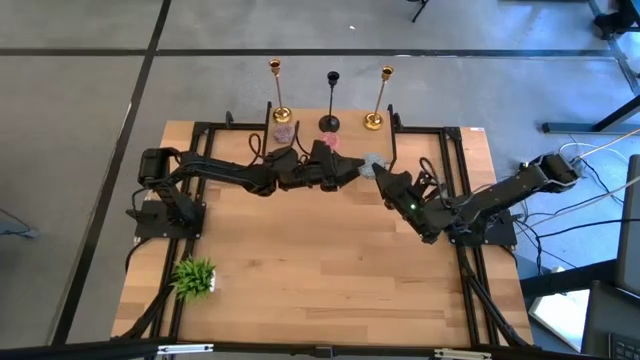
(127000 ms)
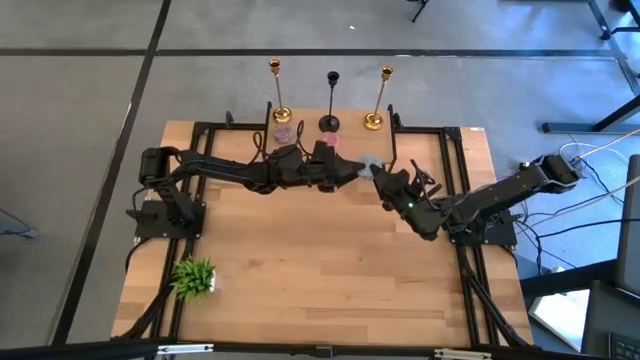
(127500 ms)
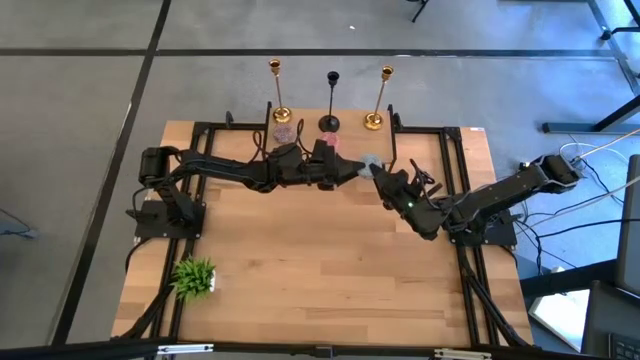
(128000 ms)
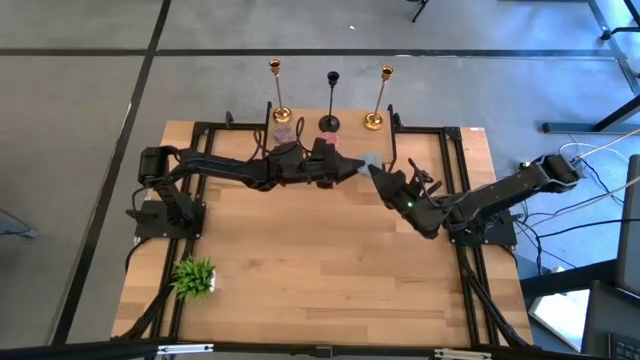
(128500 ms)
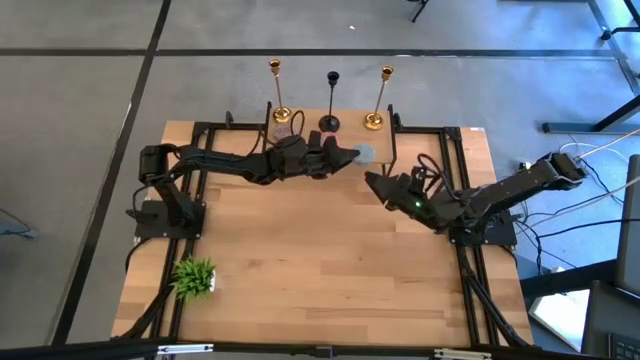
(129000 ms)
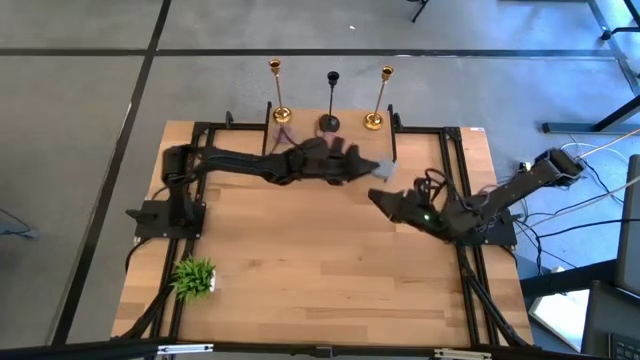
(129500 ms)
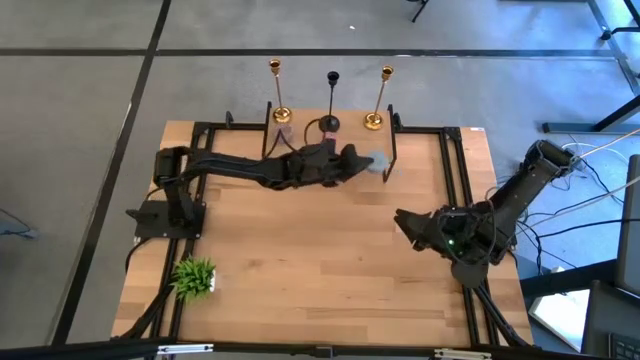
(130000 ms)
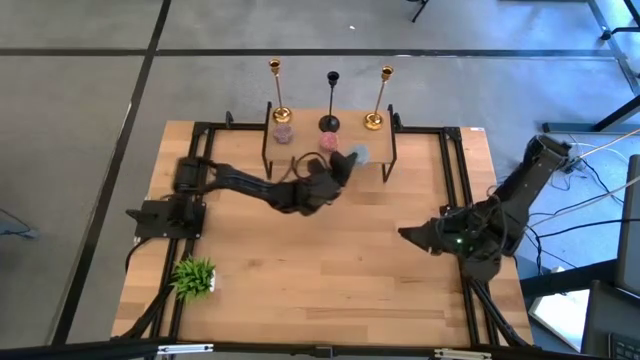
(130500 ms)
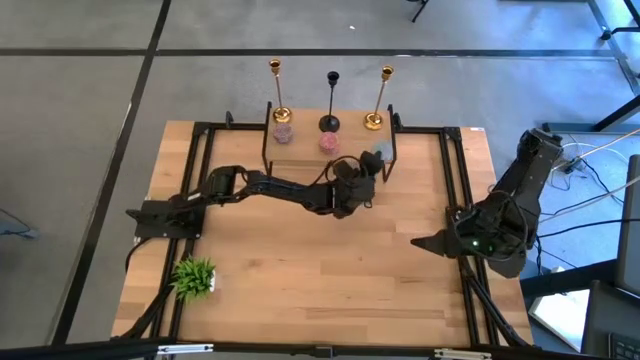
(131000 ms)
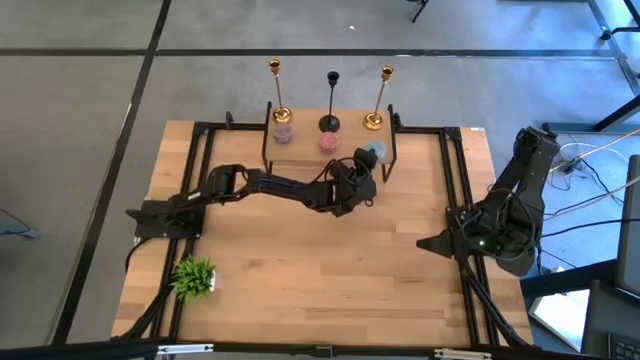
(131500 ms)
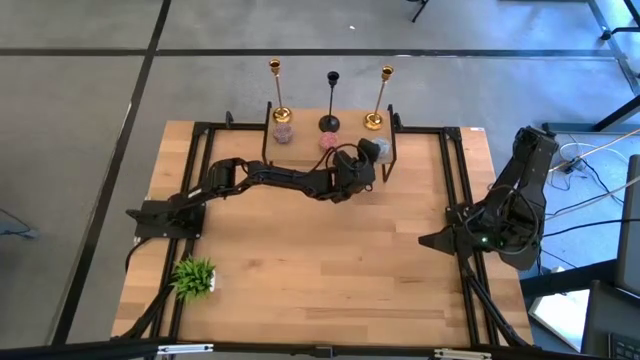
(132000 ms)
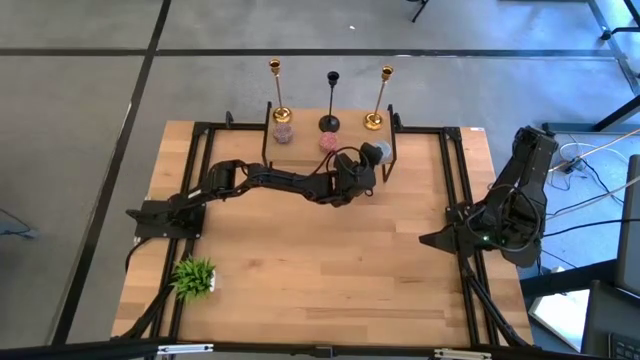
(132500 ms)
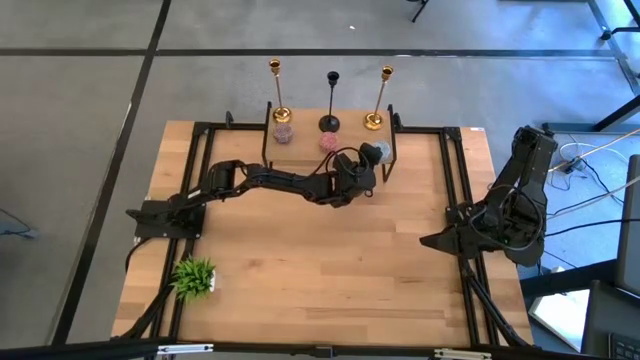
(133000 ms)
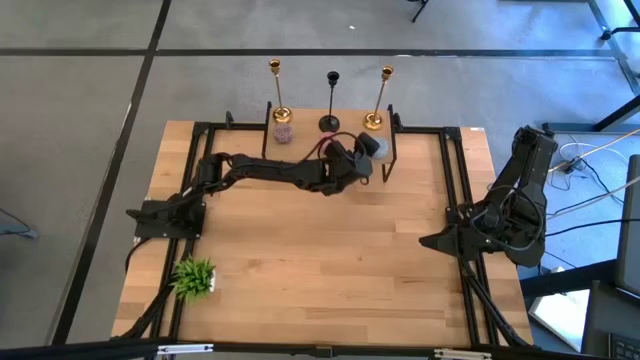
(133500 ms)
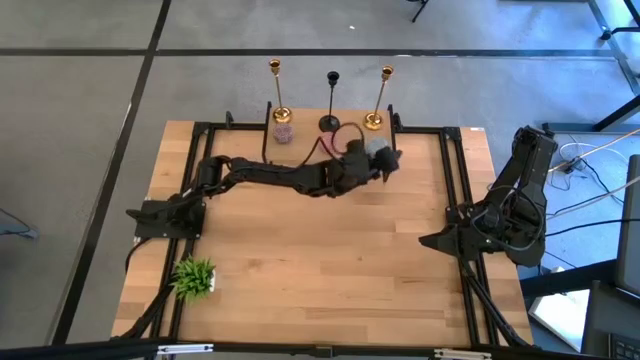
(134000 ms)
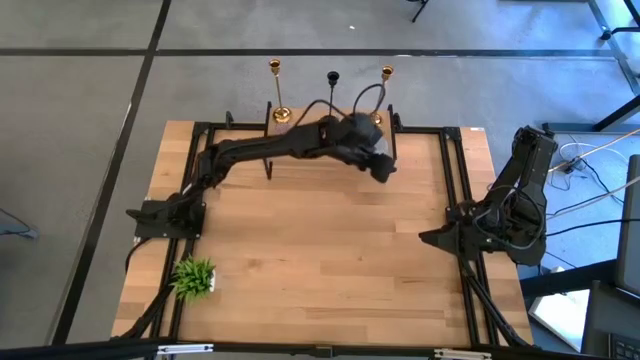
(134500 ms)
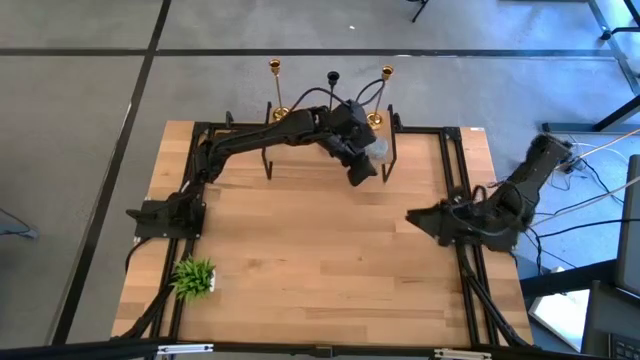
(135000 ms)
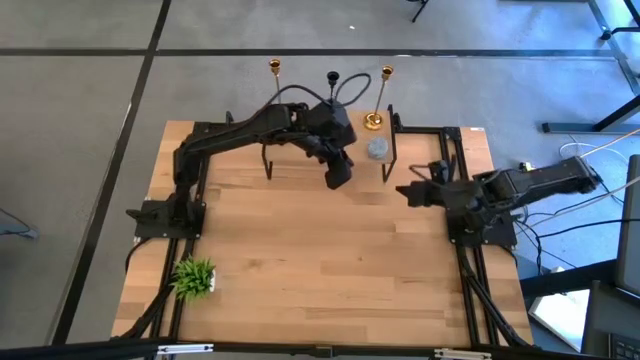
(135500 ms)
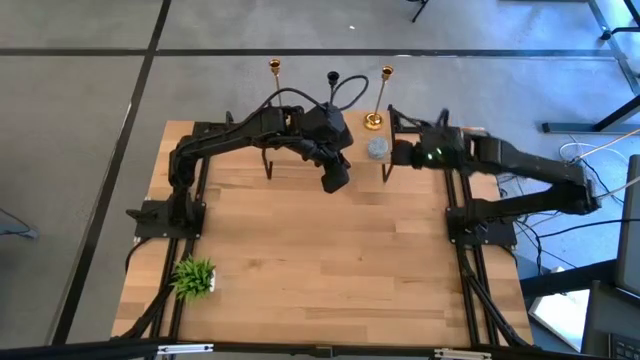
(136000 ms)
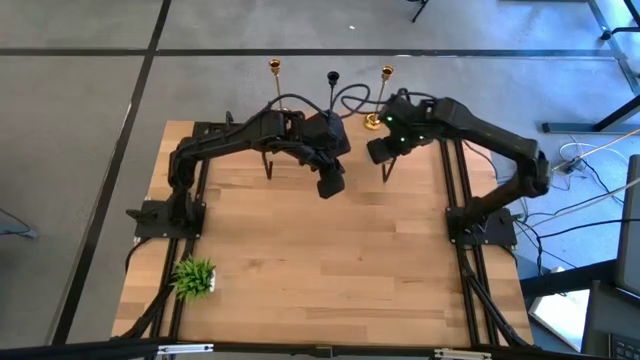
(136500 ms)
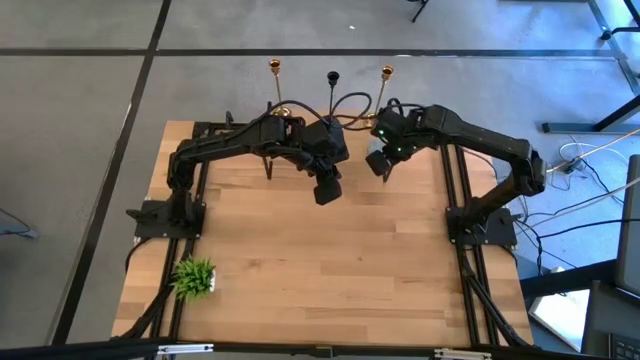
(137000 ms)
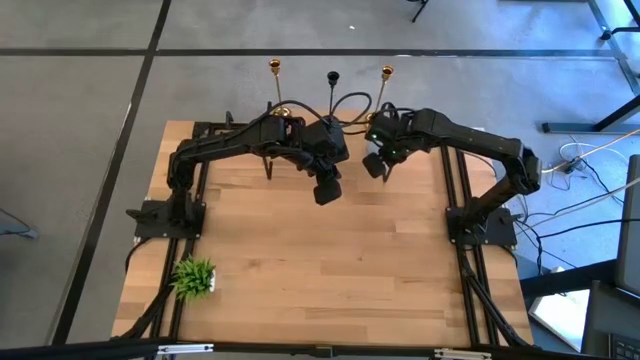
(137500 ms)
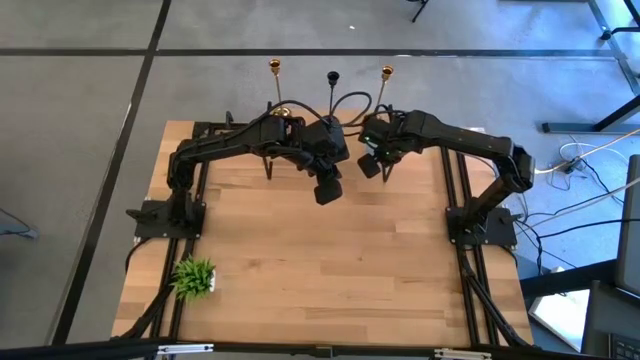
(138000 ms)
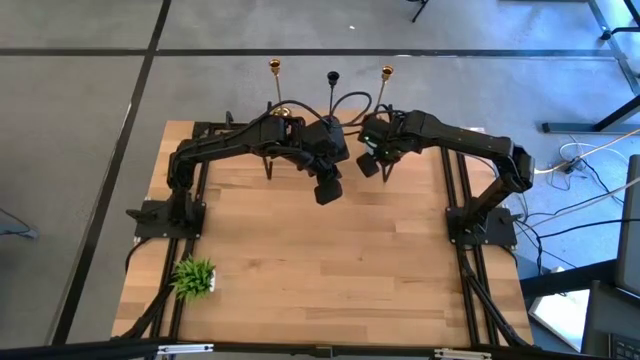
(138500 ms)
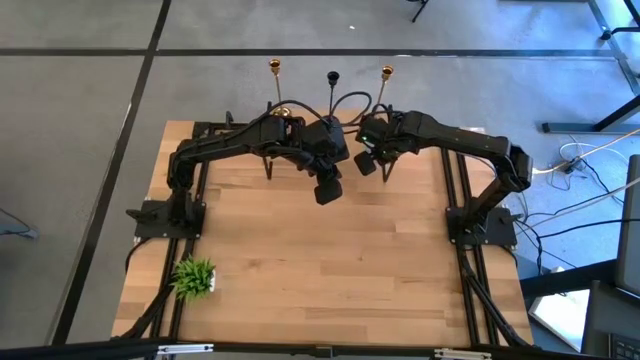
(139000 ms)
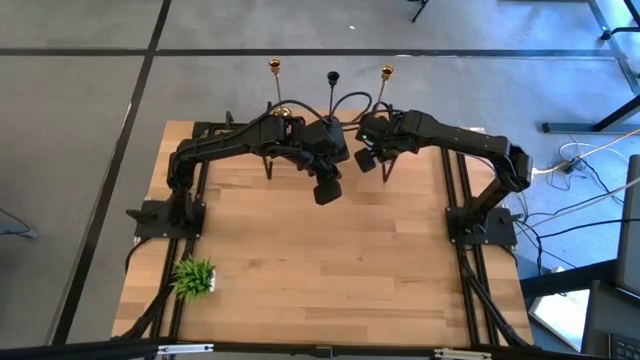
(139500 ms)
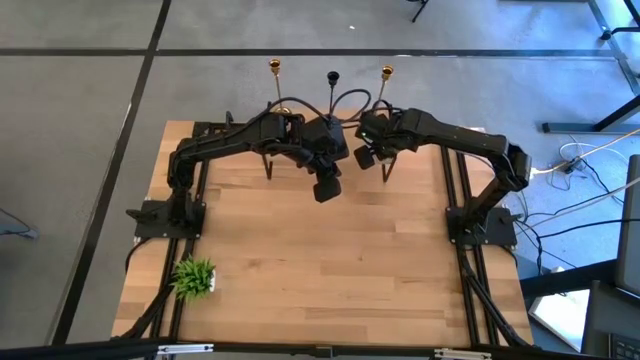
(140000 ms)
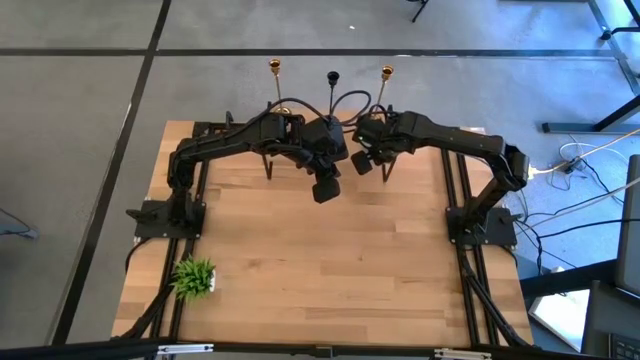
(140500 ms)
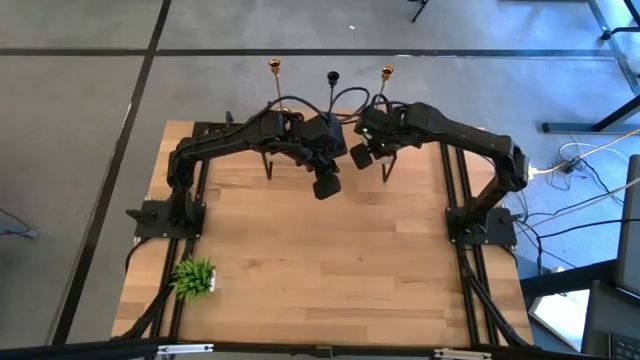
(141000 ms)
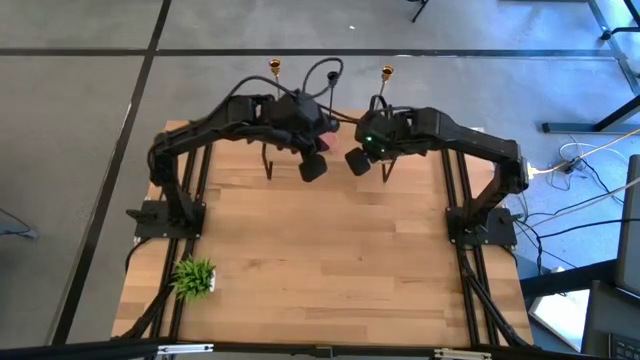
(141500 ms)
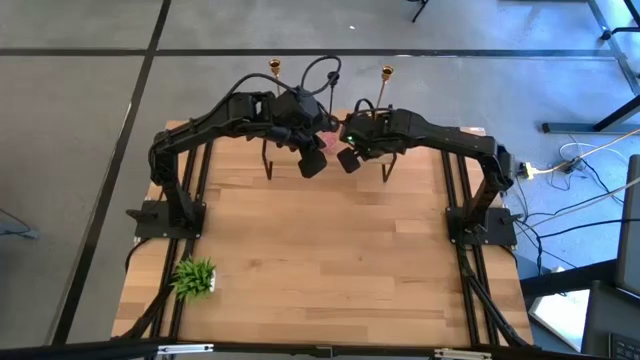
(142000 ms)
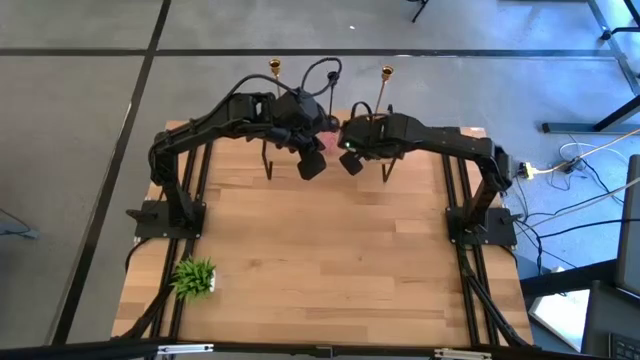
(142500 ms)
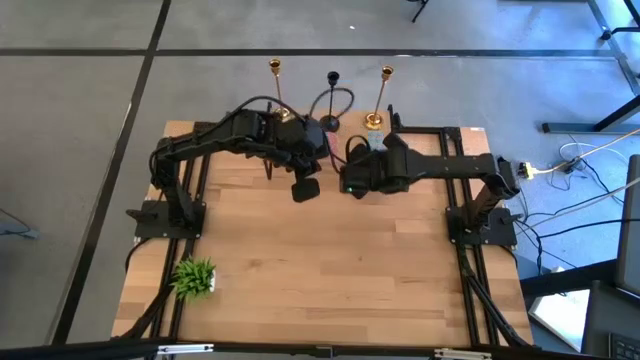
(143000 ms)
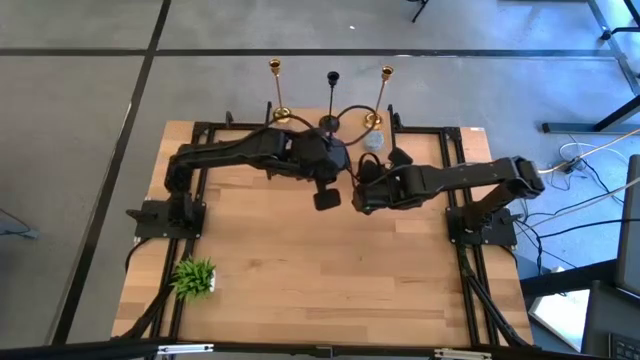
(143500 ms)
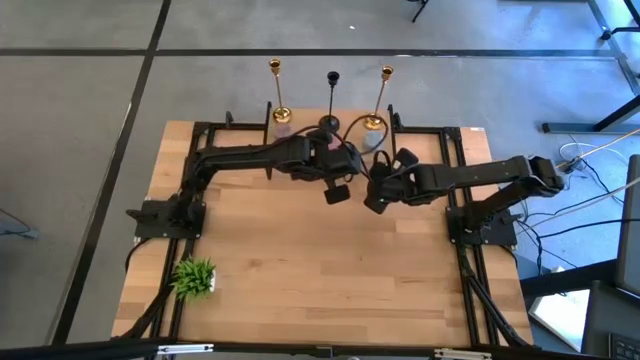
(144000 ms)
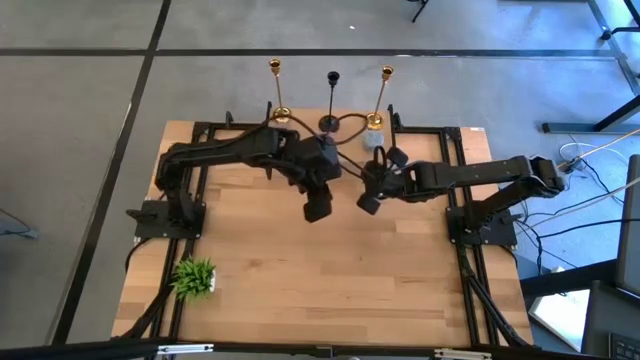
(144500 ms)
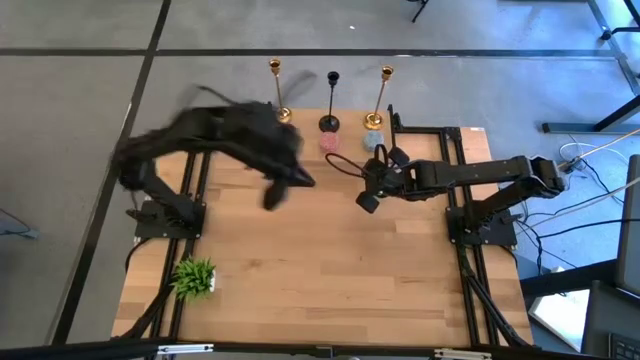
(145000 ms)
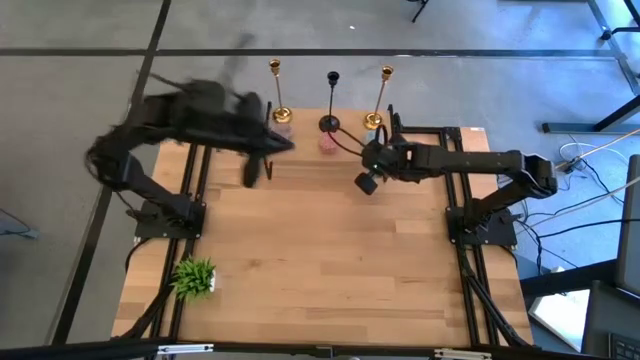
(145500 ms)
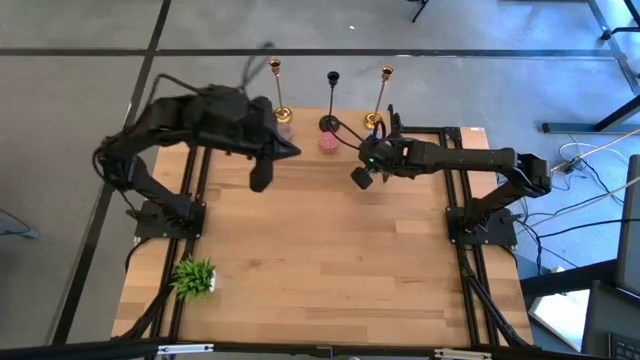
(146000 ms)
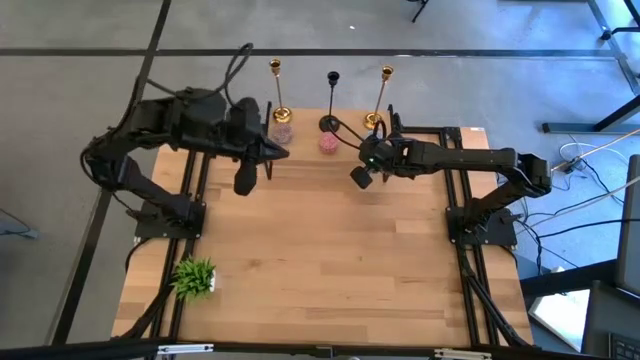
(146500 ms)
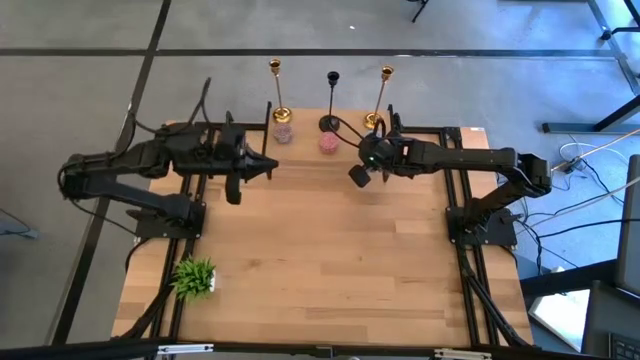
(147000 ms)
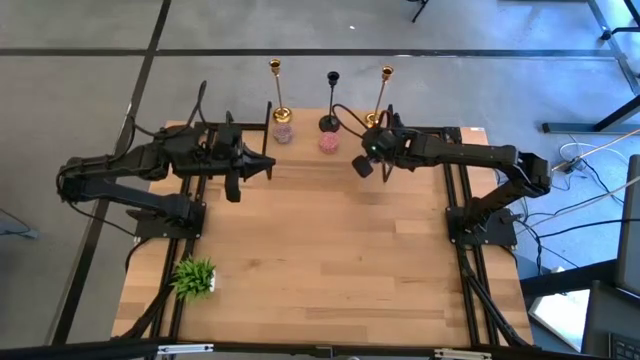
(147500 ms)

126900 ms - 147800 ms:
Task: Pick & Place candle stick holders
Put the blue scented candle on the shelf
